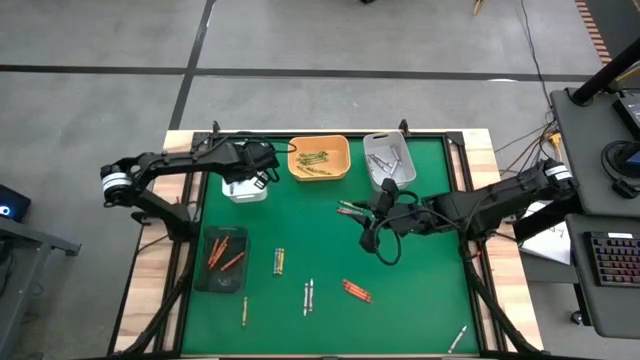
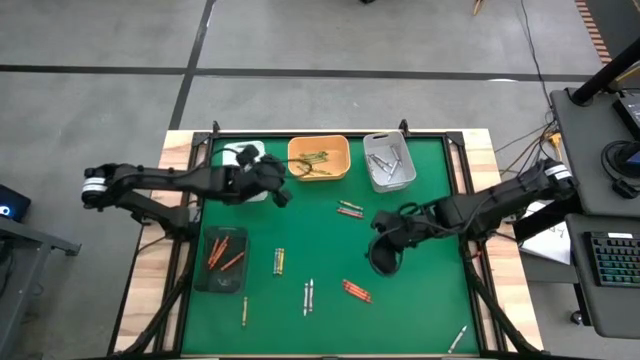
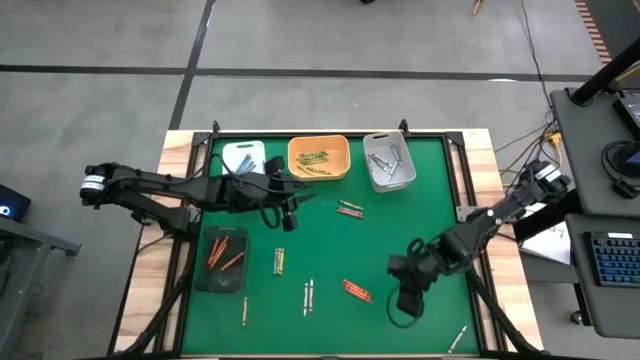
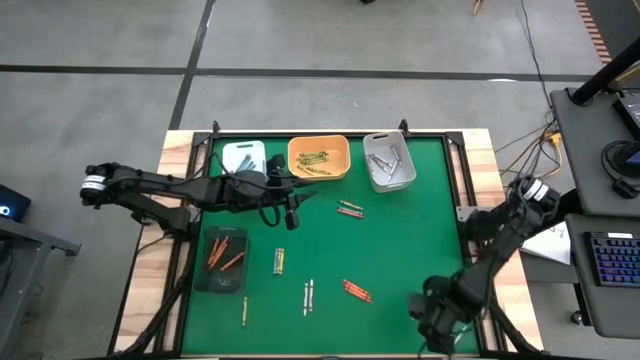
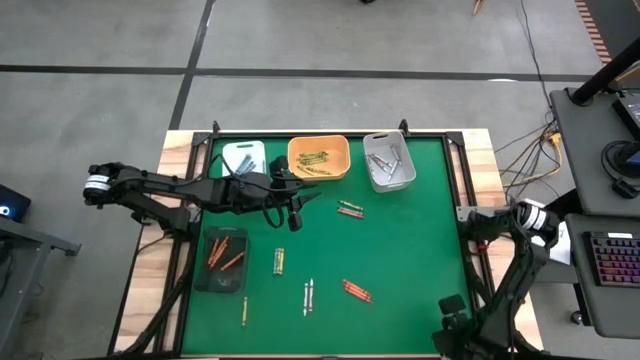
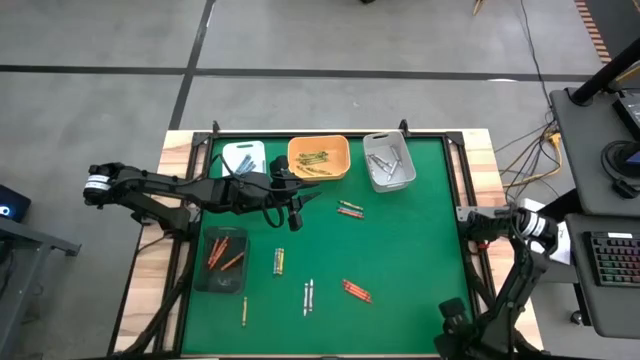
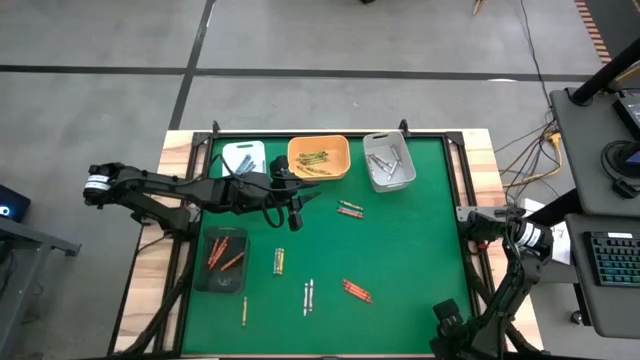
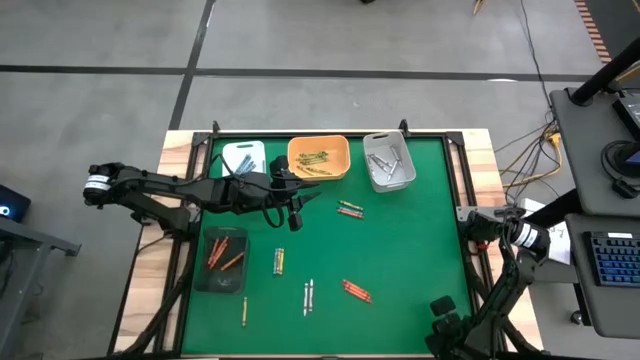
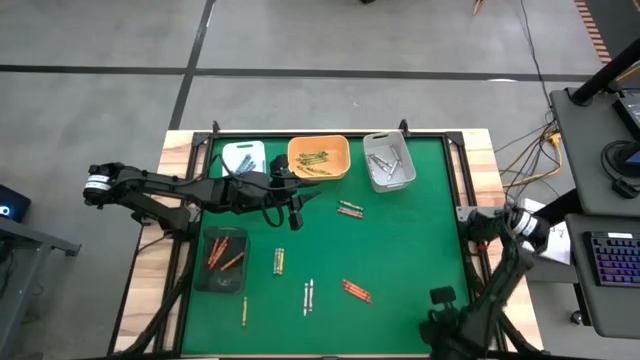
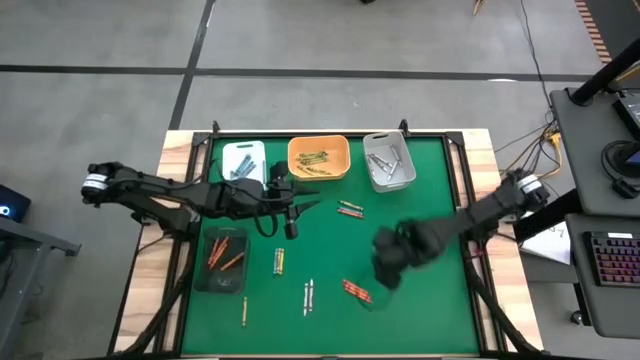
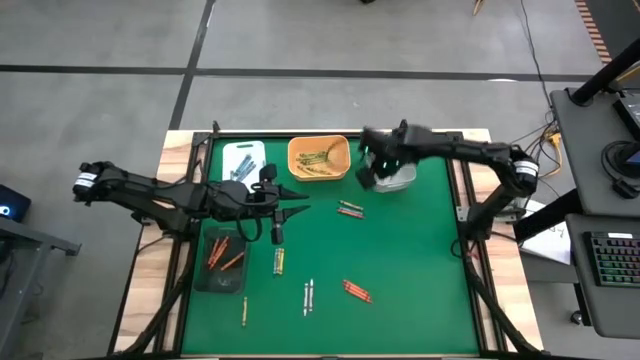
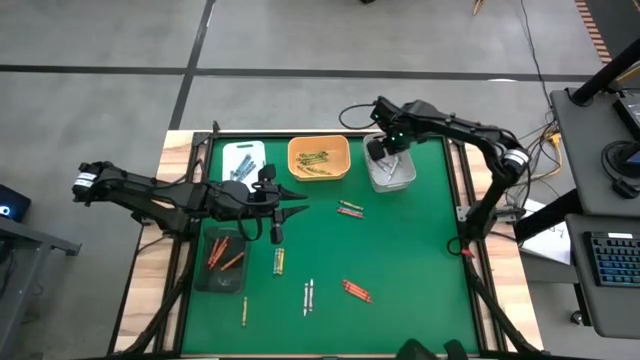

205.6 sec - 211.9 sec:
Task: Sort crayons
Put the white crayon into the gray bin

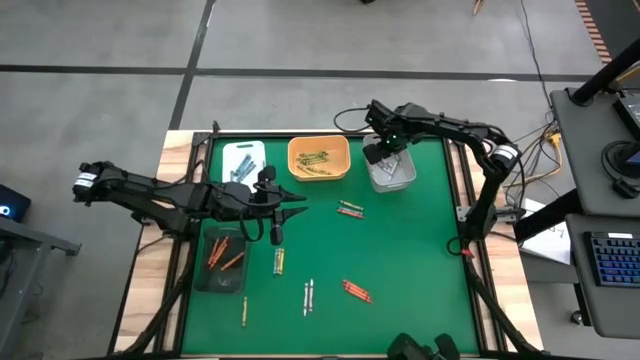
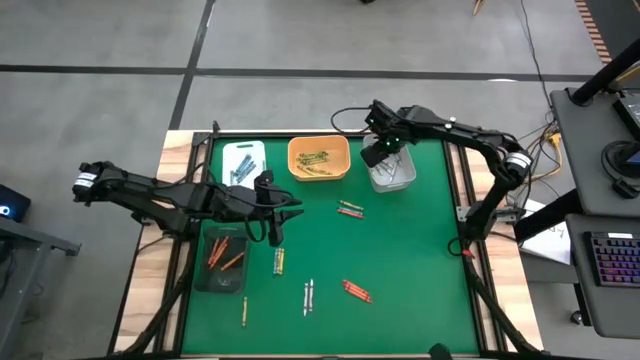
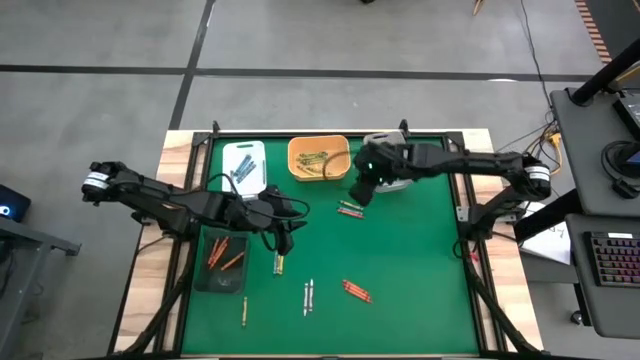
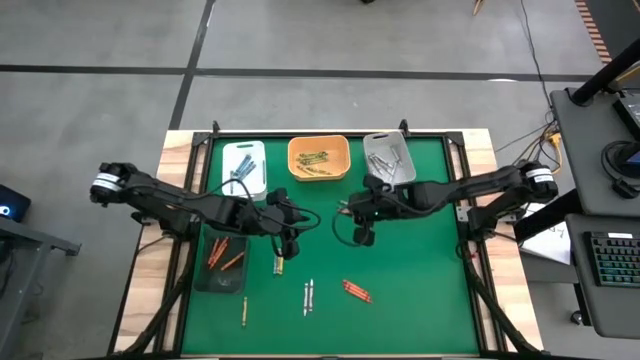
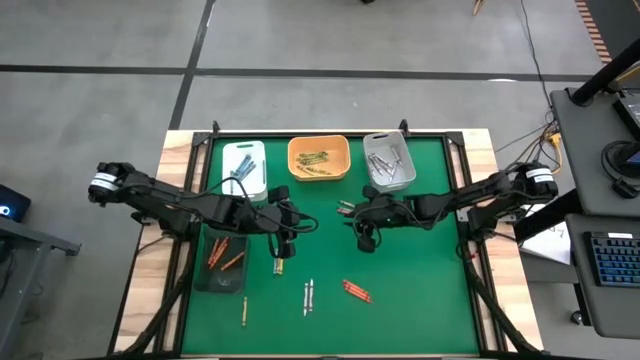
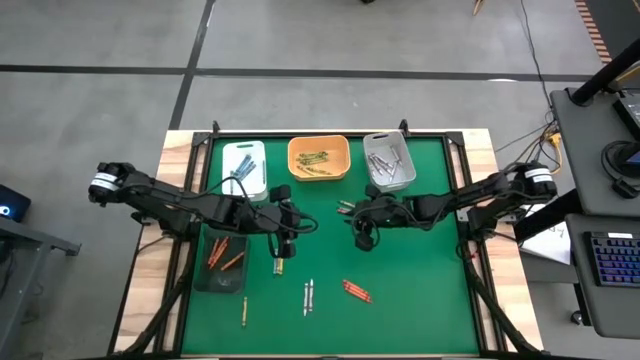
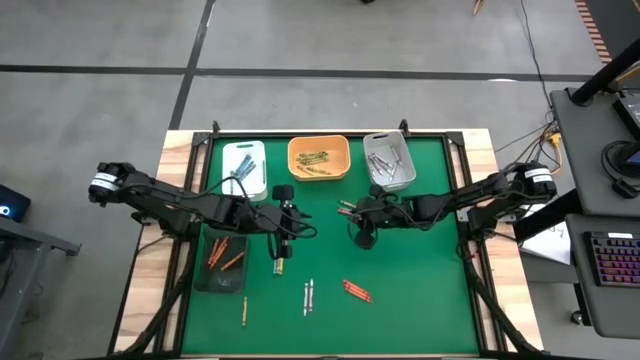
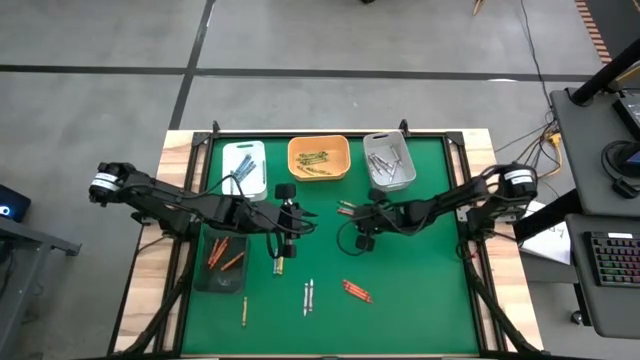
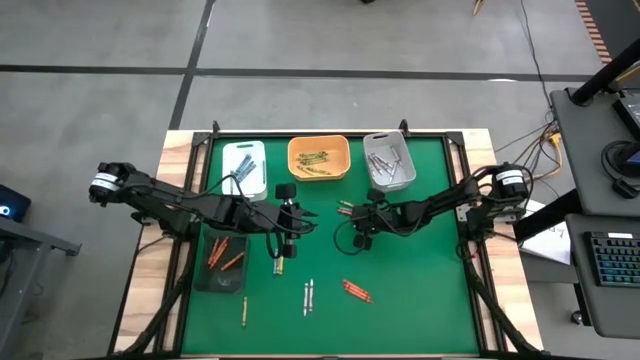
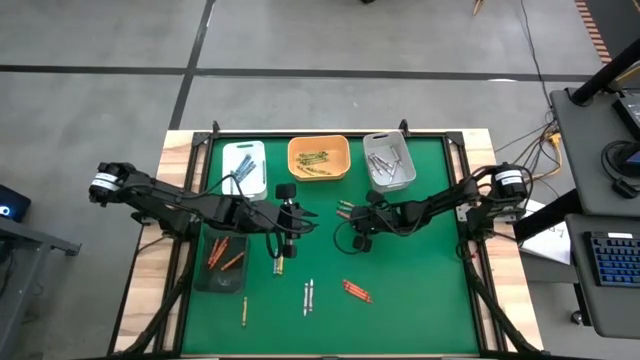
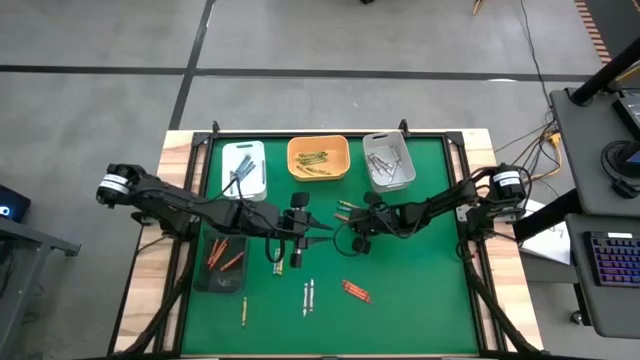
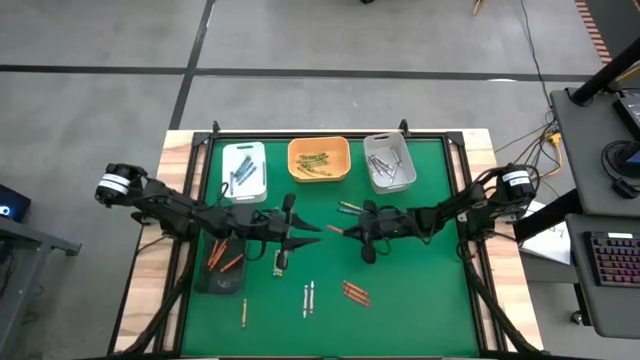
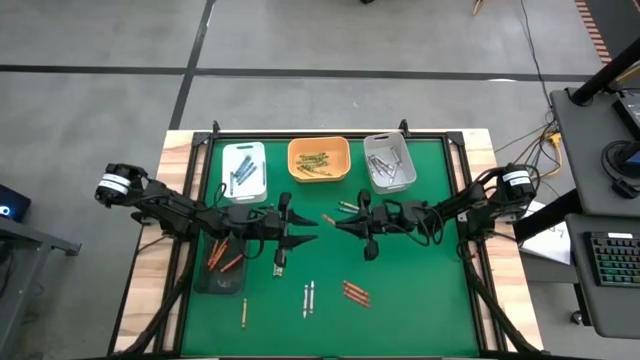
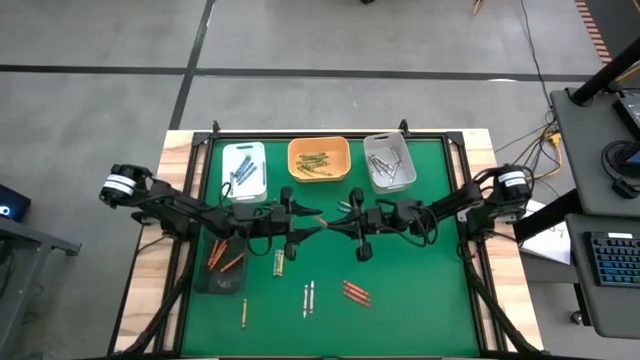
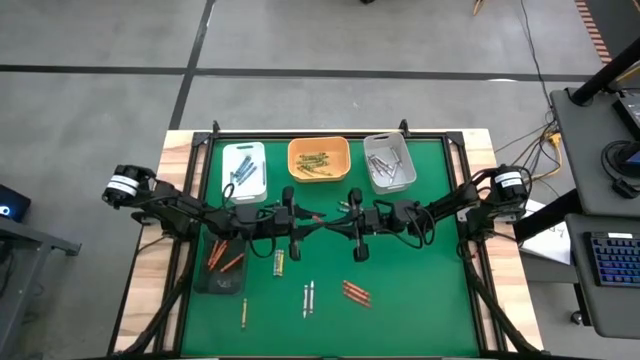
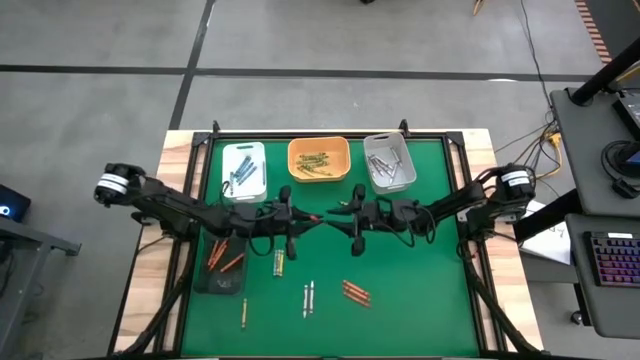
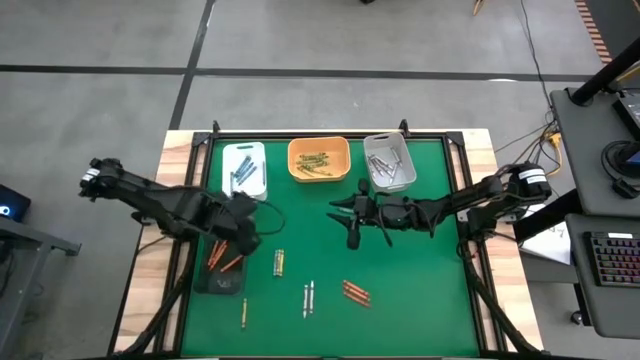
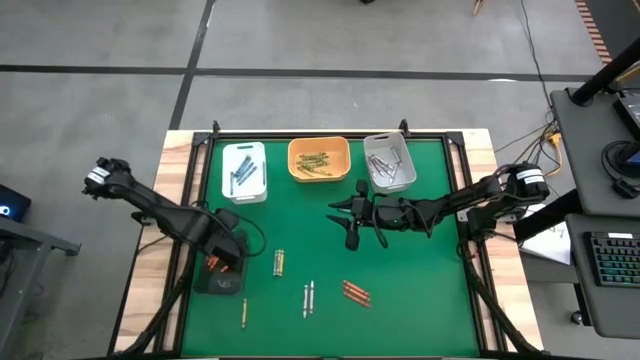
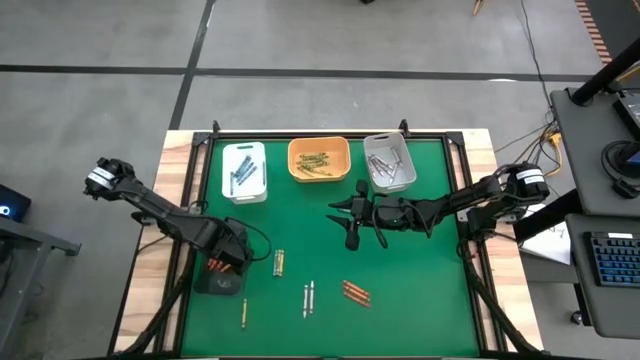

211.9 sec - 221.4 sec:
Put the orange crayon into the black bin

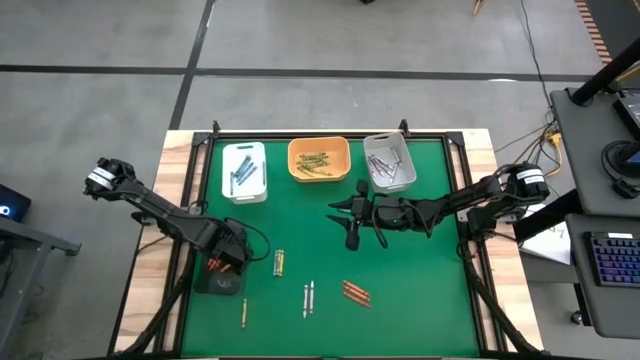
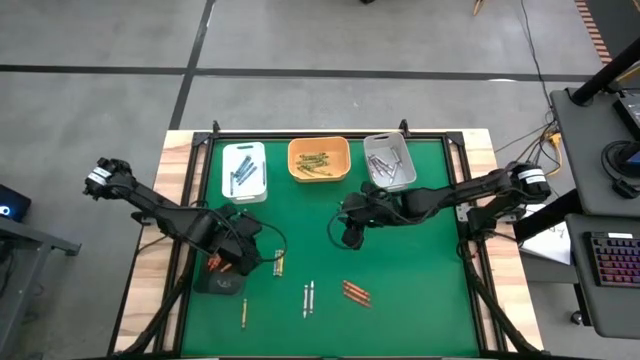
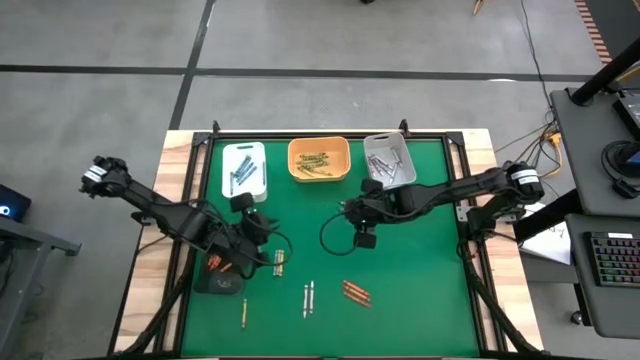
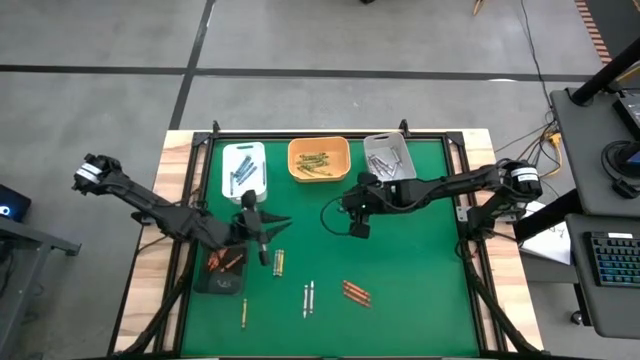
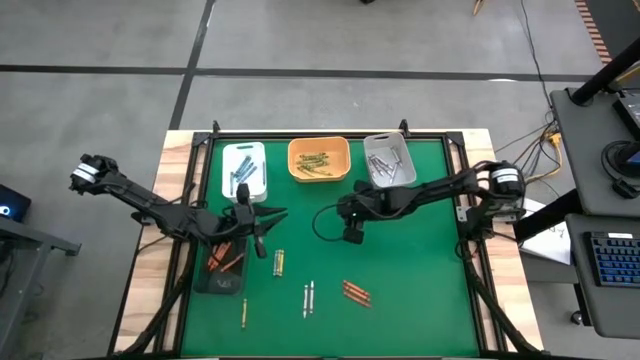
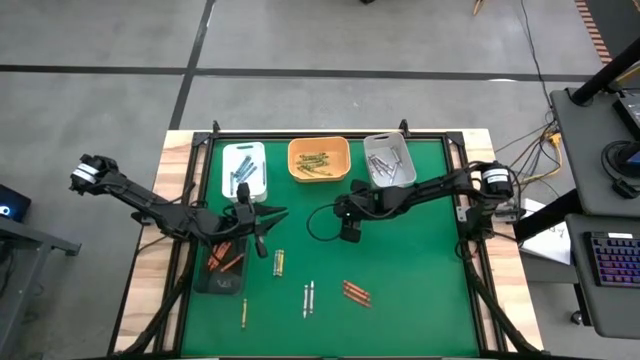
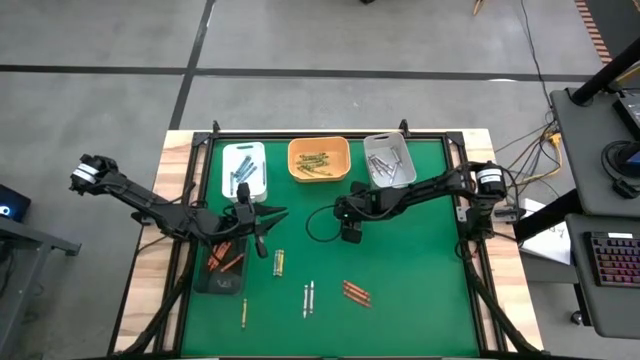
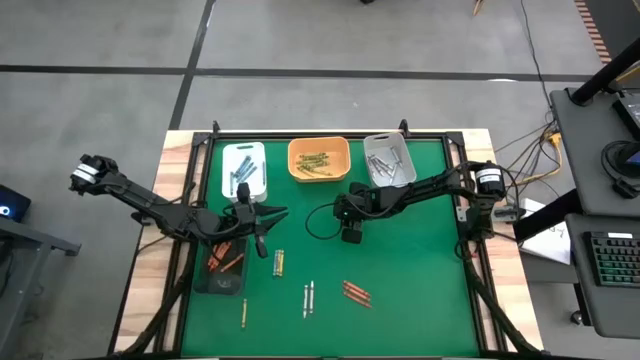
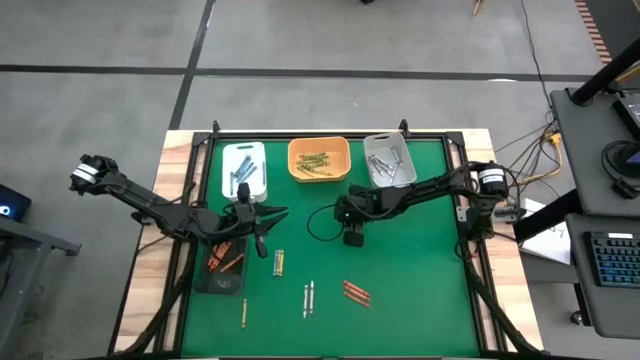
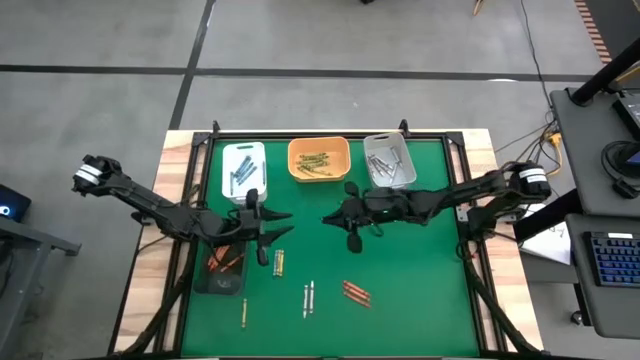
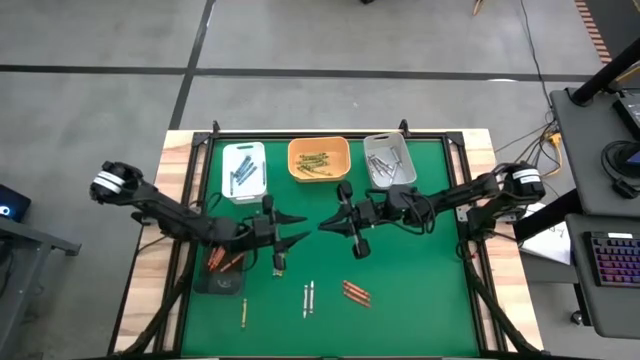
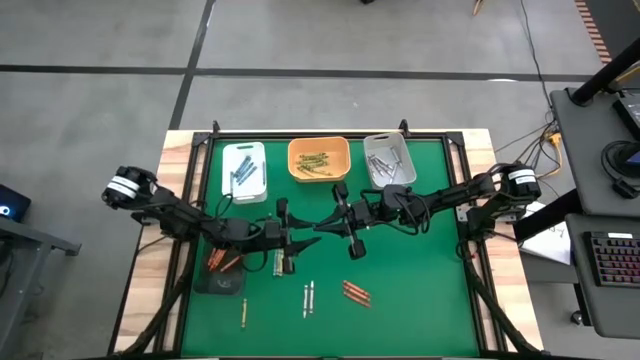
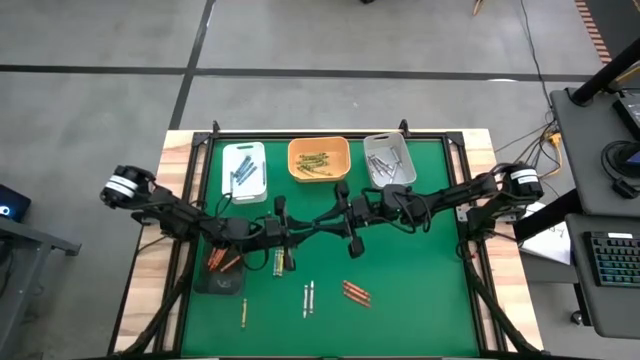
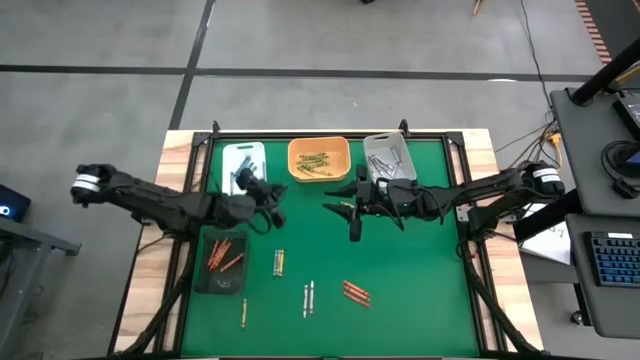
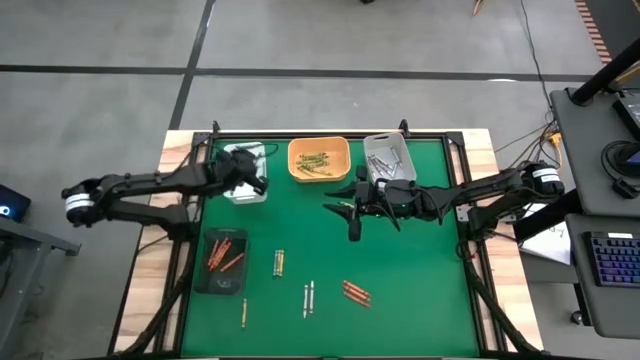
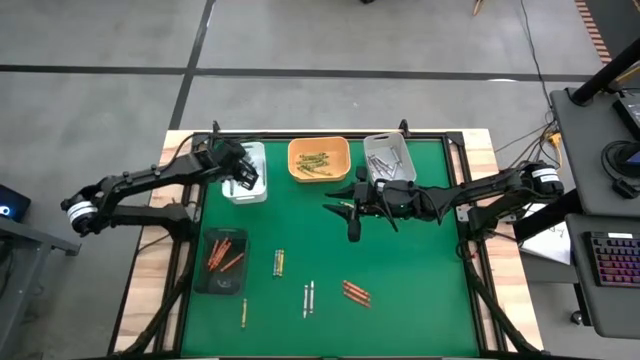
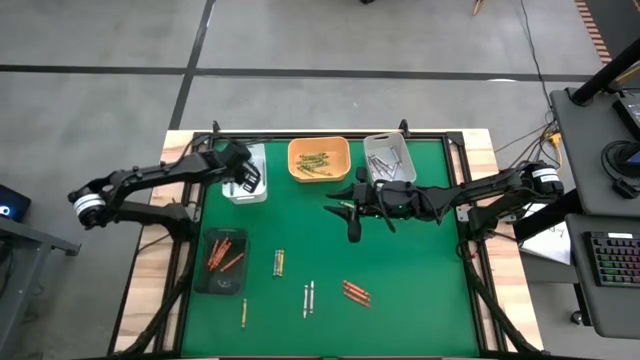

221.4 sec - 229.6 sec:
Put the blue crayon into the white bin
